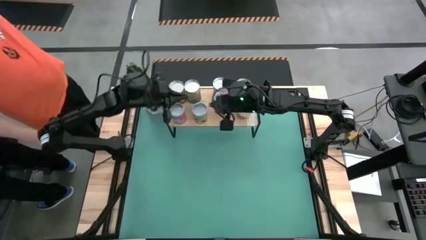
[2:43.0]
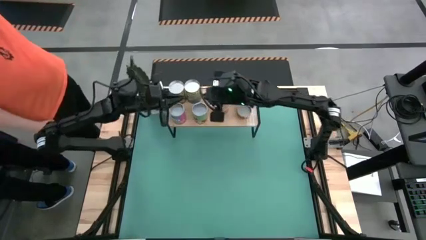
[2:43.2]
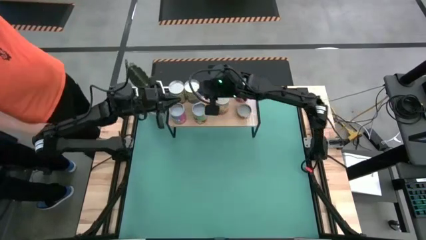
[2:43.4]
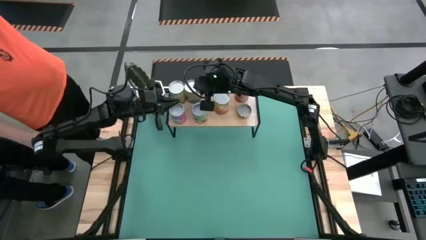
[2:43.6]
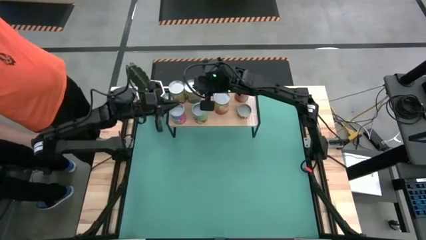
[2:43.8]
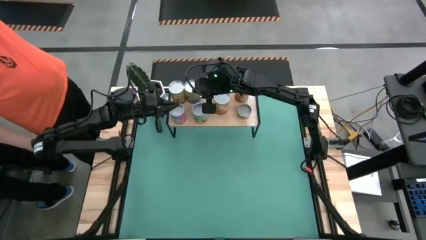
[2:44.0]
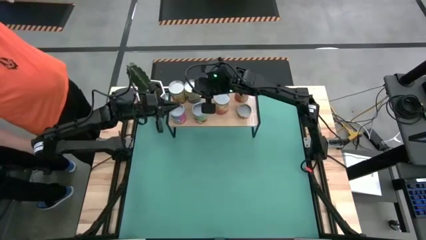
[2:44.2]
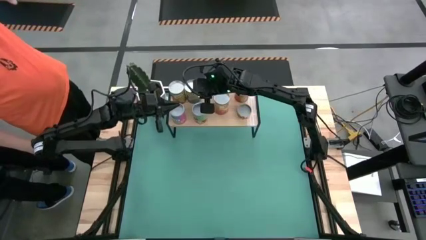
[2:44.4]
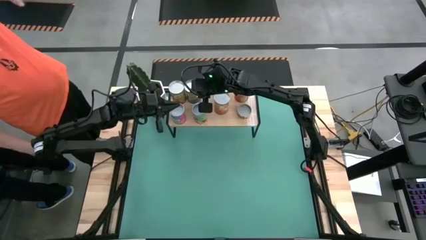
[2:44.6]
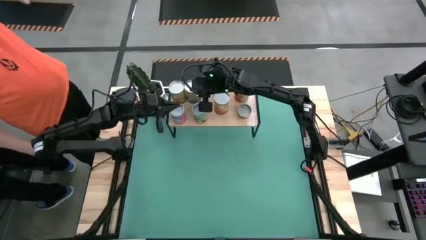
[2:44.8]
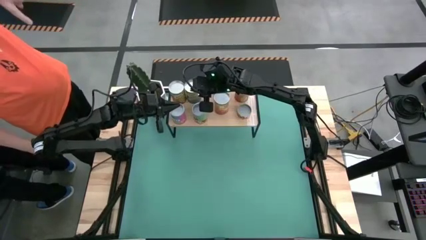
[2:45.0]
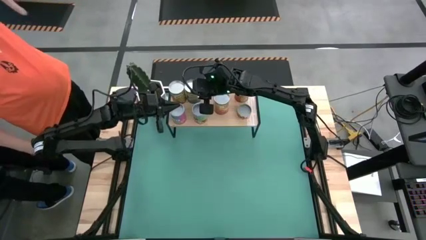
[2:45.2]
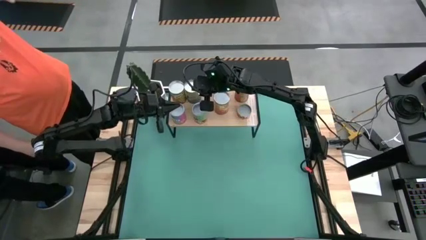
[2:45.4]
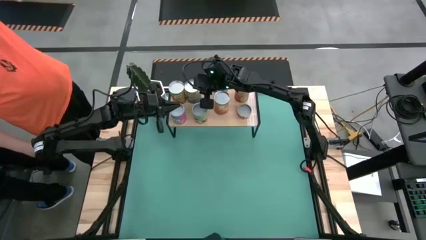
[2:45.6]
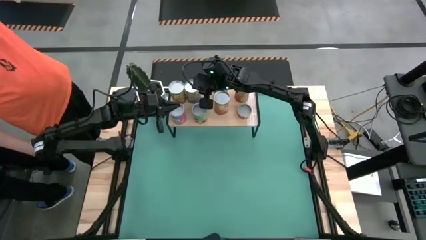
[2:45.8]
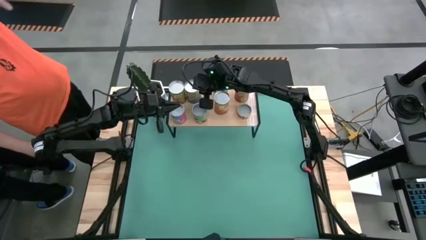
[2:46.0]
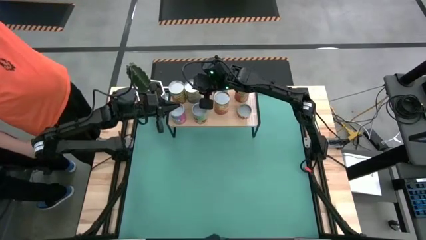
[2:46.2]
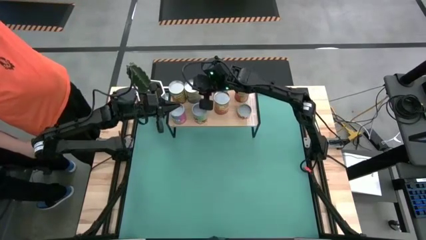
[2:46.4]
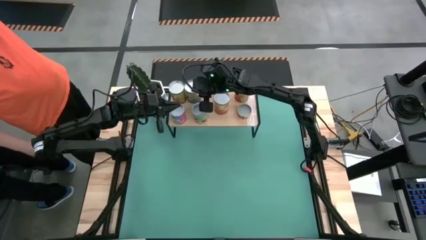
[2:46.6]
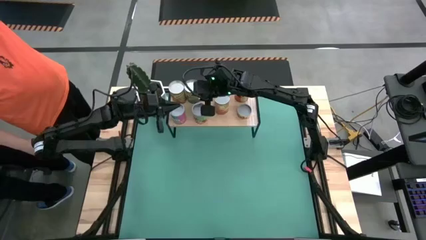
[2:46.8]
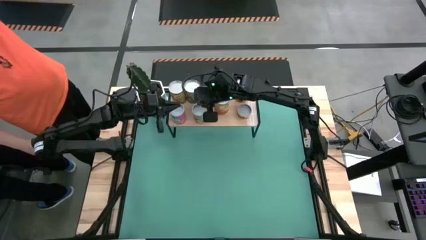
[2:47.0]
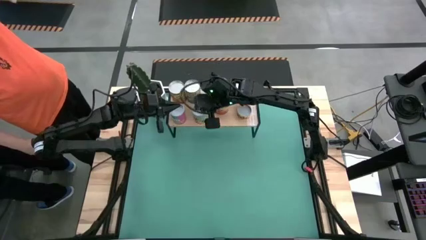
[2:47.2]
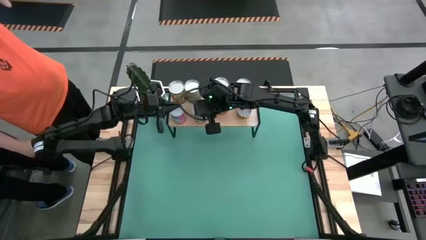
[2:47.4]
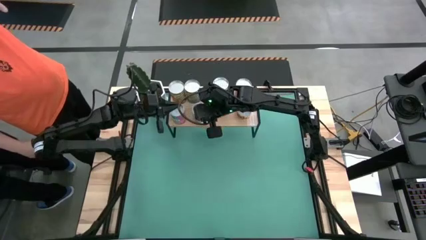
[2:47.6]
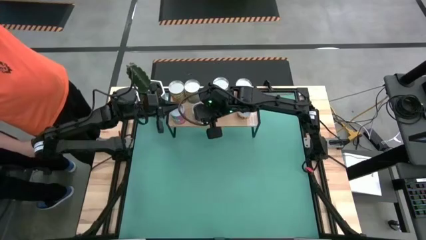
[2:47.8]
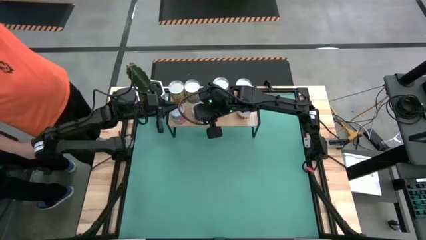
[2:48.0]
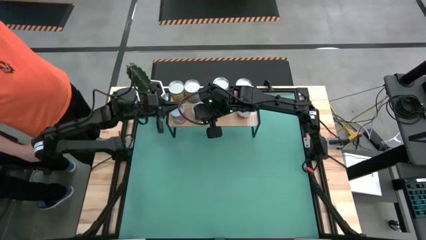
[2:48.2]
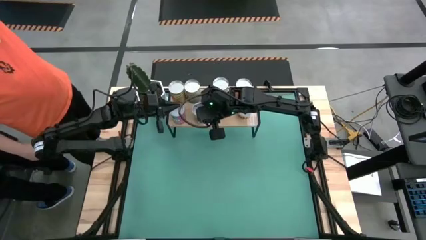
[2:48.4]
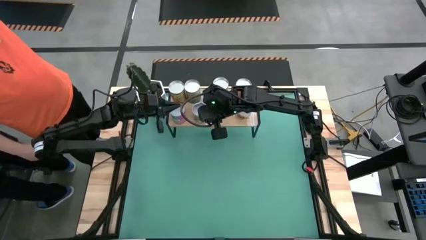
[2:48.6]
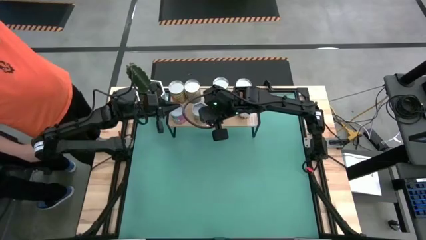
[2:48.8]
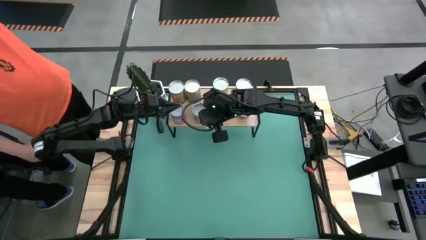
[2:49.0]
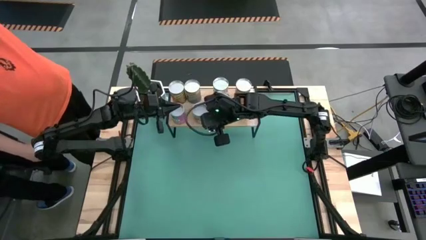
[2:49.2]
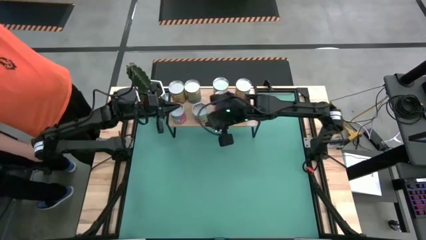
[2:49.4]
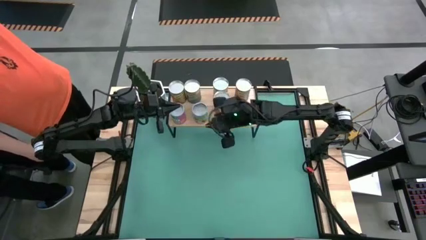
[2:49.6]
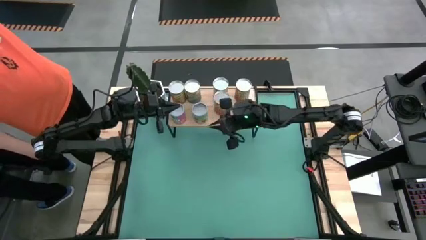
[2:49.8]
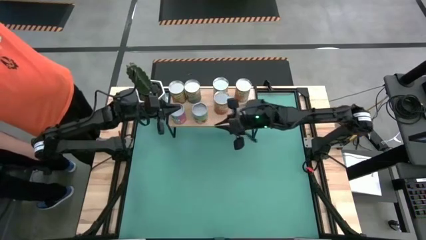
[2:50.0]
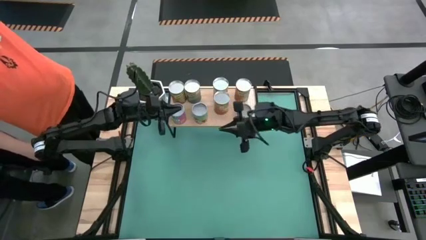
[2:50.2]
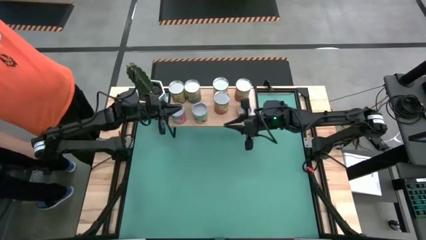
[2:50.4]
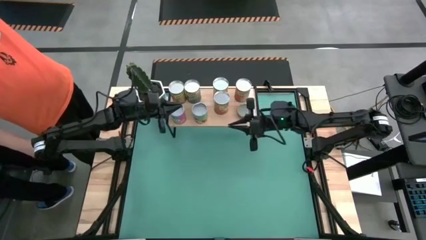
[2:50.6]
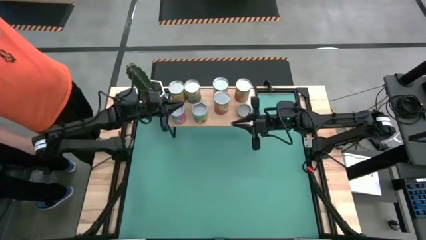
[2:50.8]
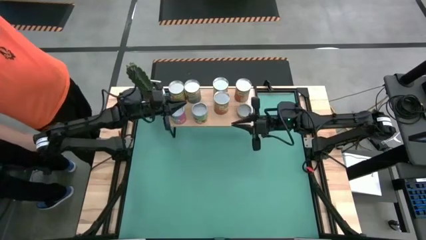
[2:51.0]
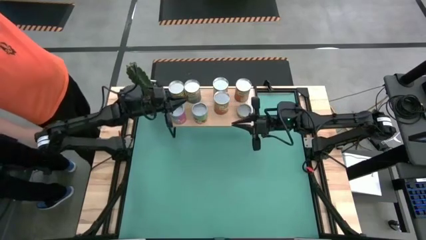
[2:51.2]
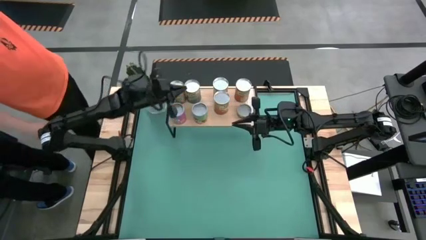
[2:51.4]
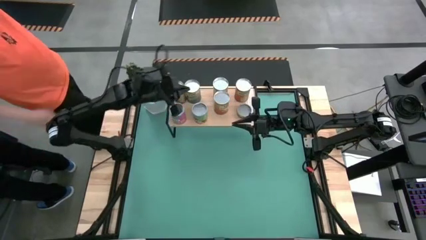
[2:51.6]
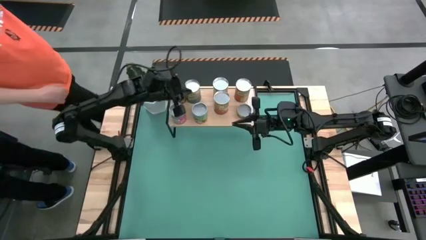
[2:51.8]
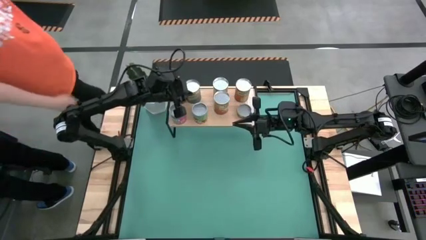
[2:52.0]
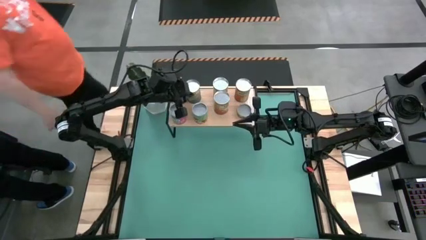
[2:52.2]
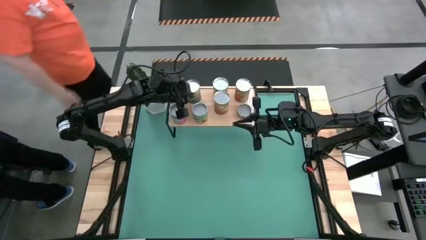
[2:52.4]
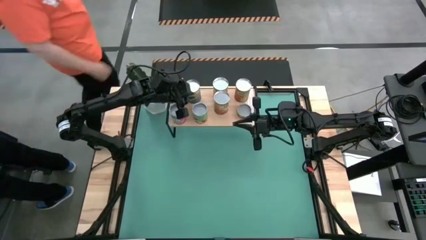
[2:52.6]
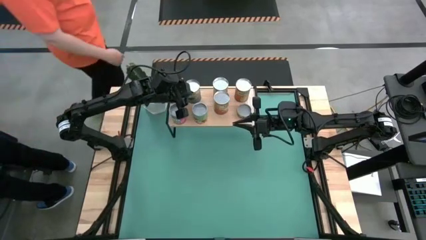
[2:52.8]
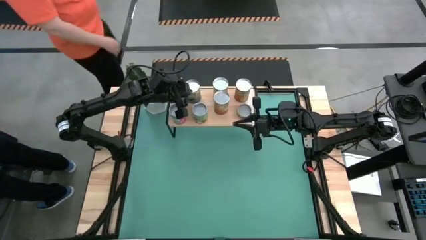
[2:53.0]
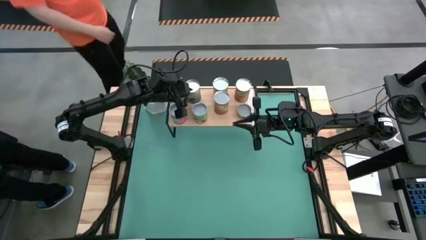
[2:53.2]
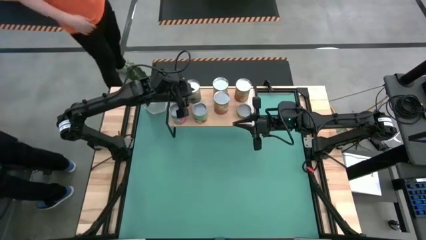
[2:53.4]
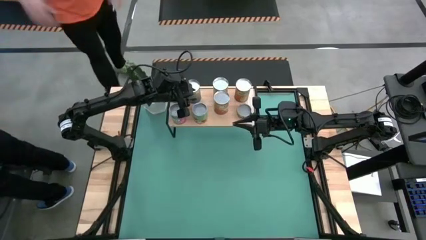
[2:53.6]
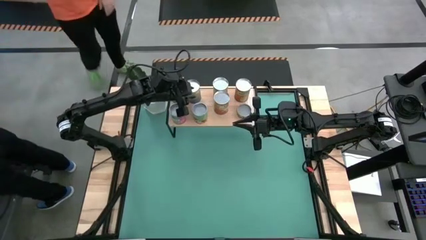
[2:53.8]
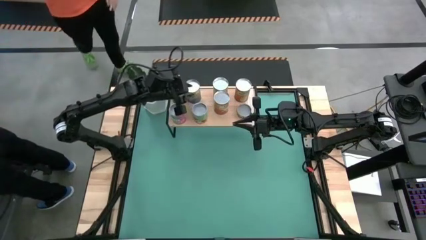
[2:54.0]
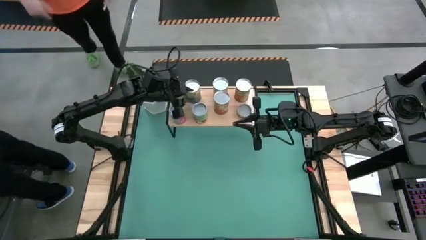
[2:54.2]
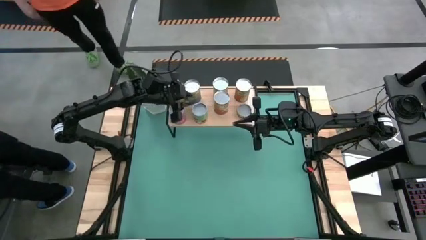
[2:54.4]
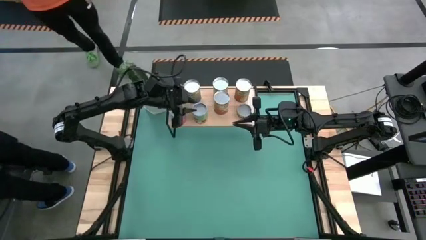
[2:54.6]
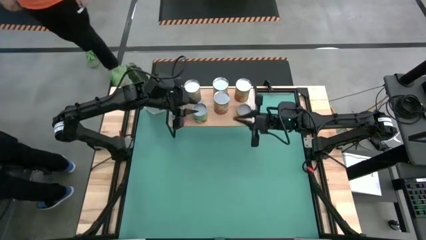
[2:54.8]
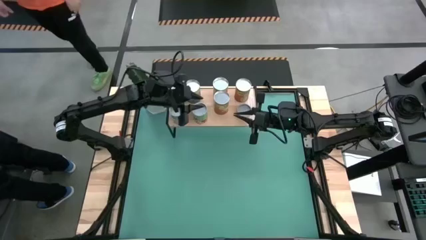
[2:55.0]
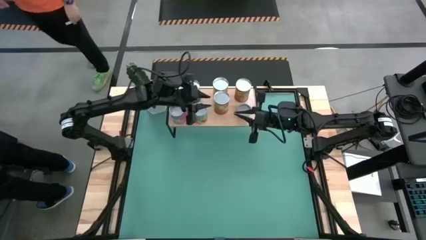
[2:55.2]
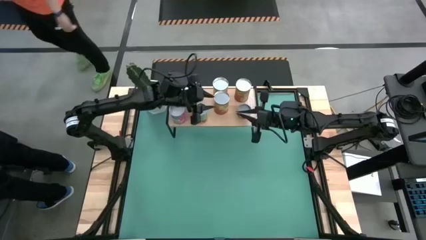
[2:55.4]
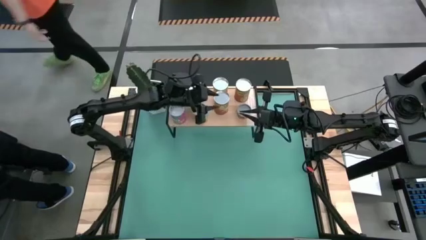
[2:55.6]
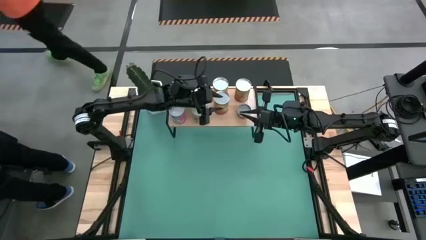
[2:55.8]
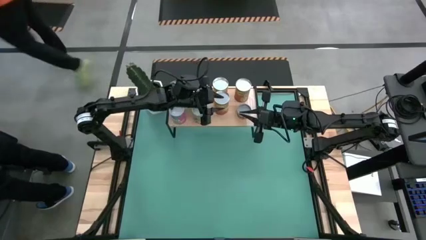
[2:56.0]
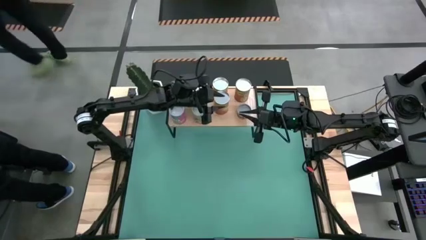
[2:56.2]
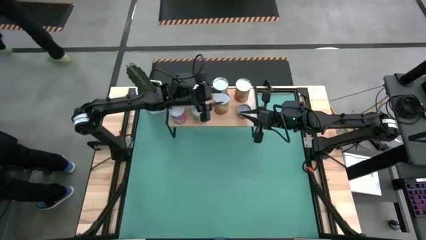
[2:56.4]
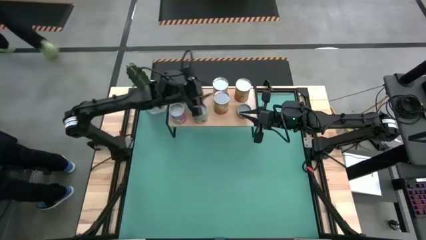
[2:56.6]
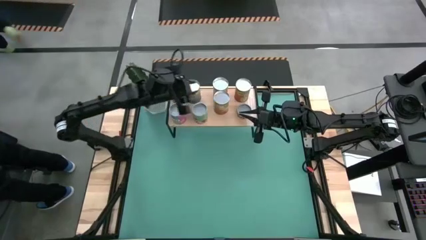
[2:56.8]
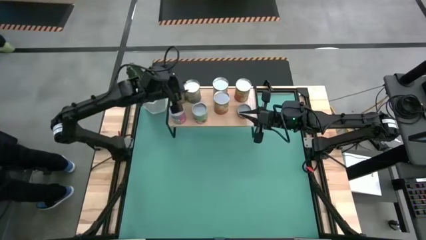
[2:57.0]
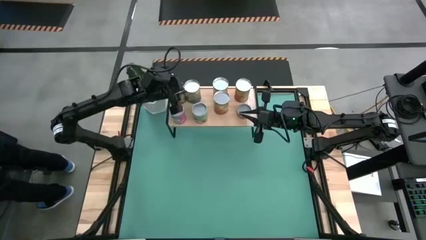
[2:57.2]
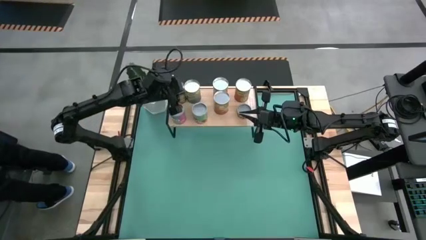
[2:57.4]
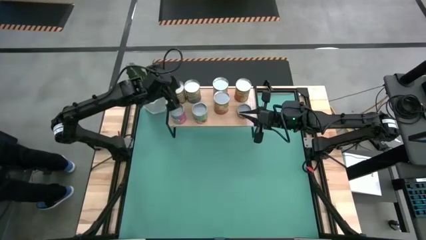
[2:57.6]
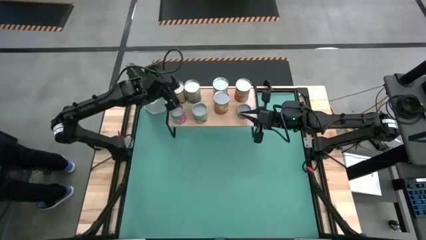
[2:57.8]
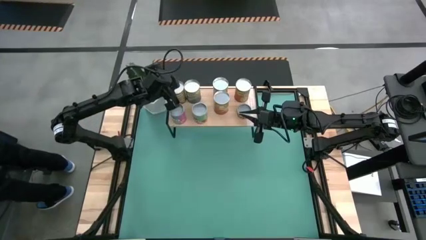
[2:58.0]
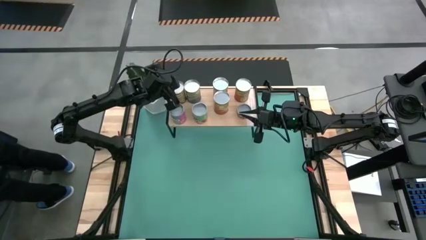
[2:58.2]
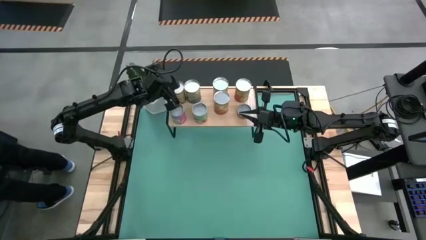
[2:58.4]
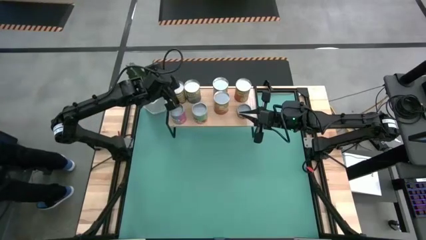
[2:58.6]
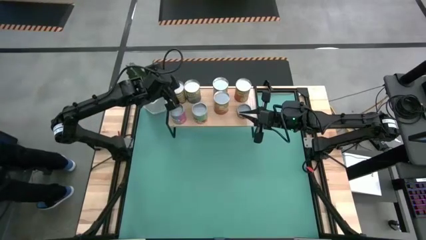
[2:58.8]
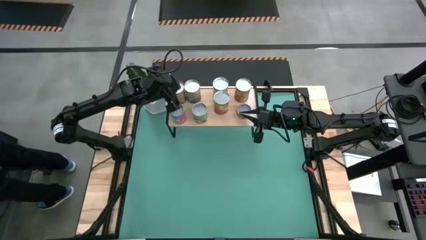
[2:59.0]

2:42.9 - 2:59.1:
Task: Pick and place cans onto a shelf
Adjust the canned goods on the shelf

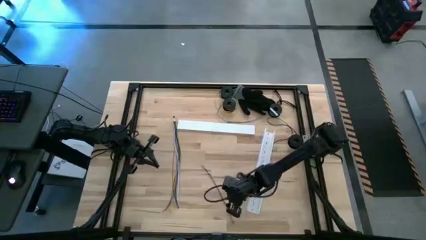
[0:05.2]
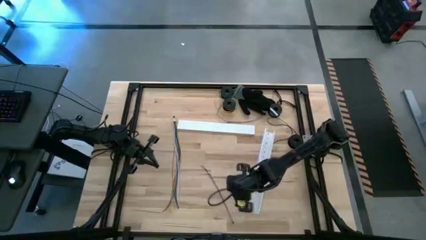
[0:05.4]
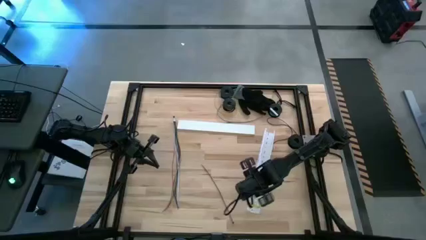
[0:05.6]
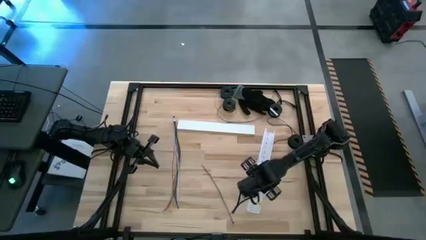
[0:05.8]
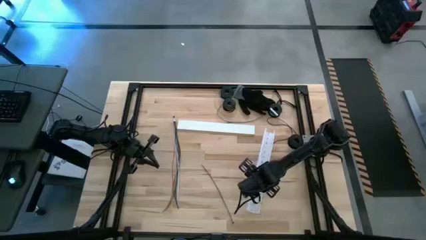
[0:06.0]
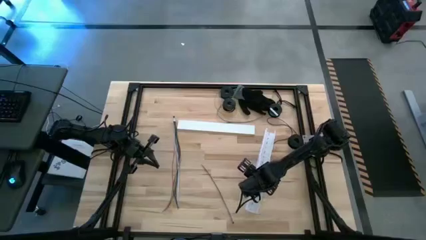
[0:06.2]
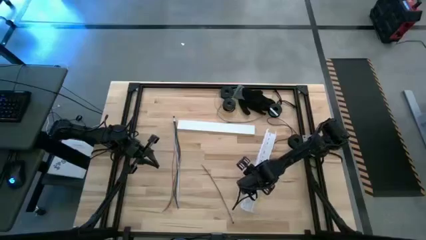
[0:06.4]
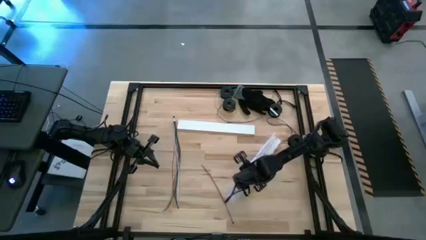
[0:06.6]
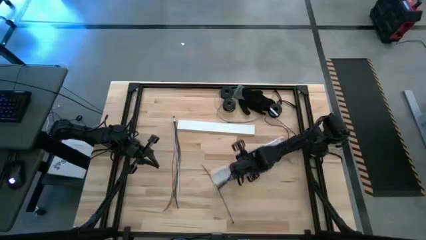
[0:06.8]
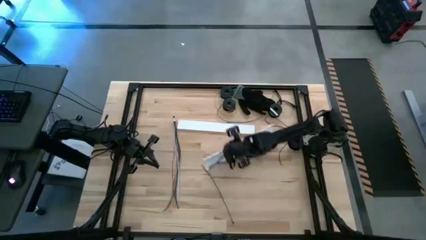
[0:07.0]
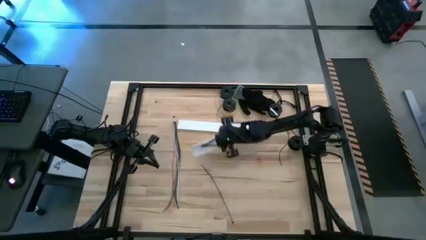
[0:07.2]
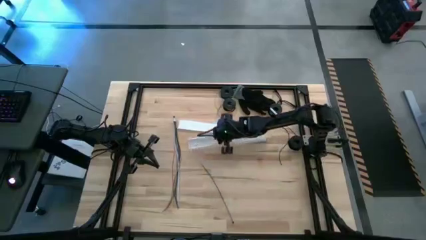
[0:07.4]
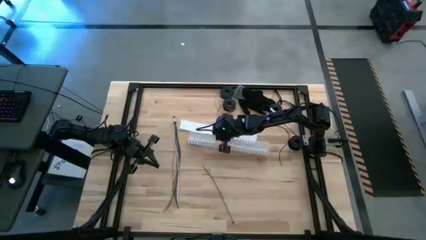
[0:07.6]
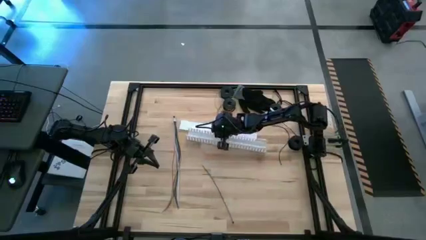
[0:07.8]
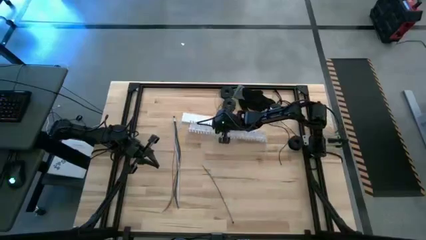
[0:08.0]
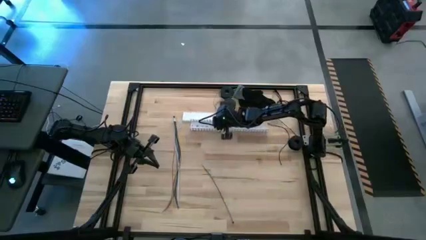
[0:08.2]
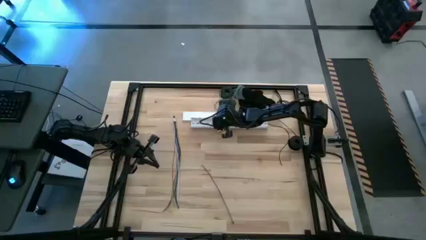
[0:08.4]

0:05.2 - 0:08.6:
Task: Ziptie cables
Move the white cable duct to the top middle of the table
